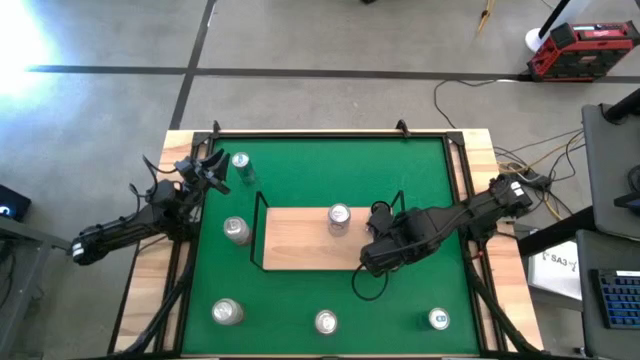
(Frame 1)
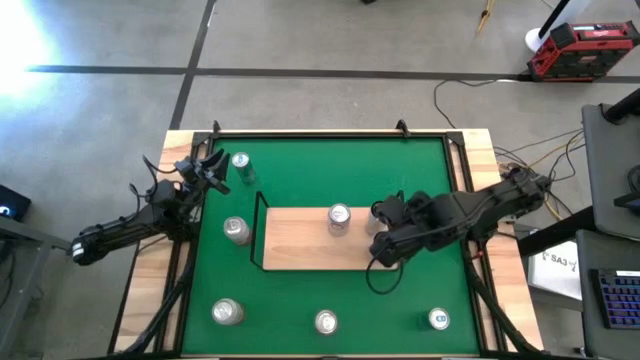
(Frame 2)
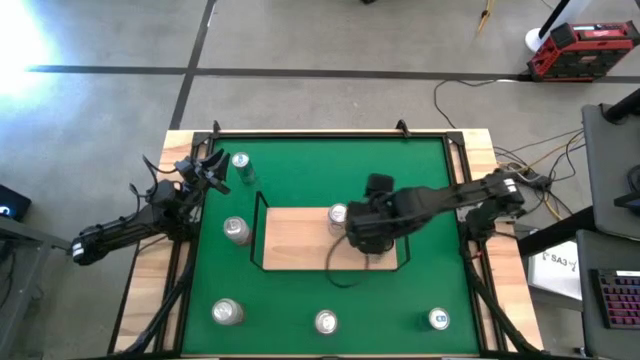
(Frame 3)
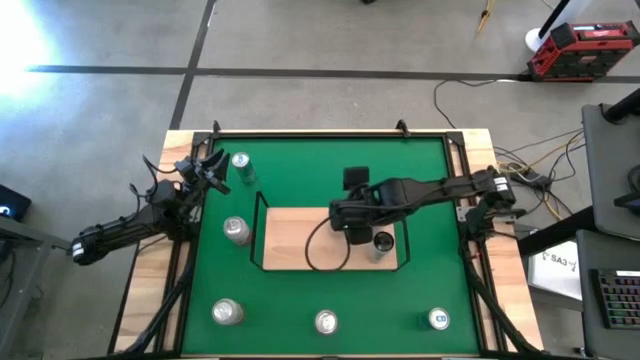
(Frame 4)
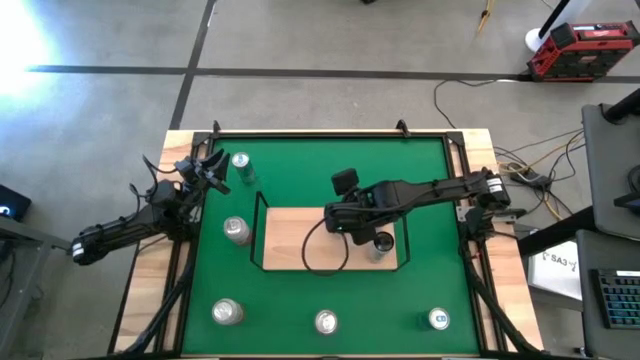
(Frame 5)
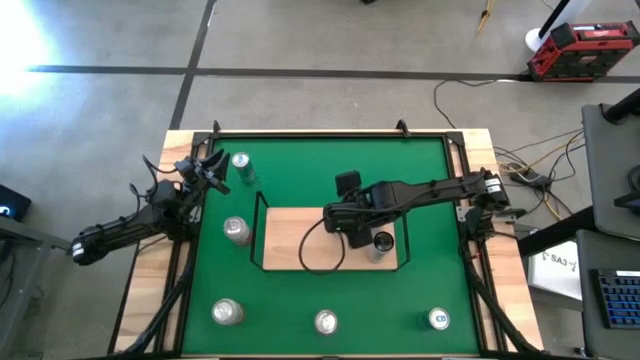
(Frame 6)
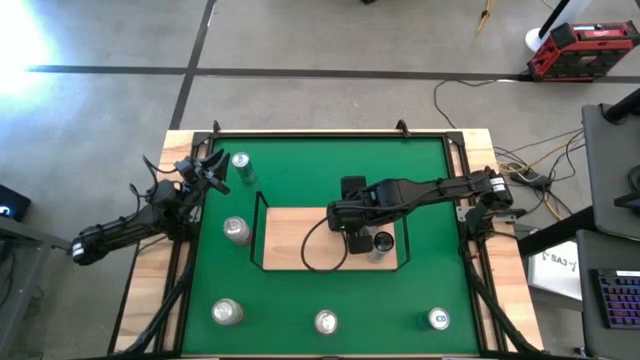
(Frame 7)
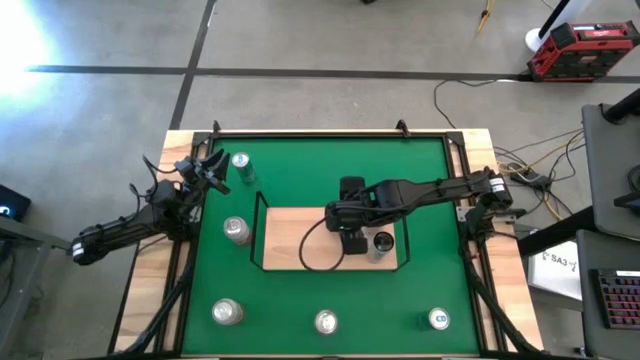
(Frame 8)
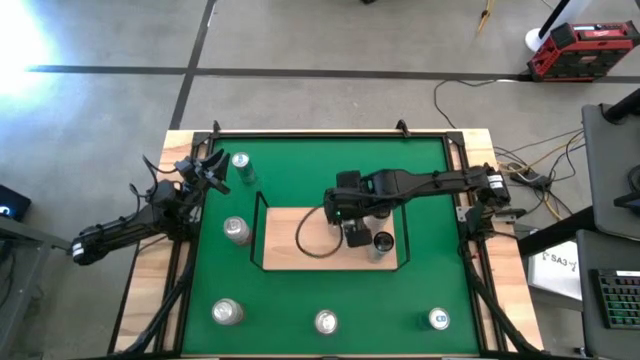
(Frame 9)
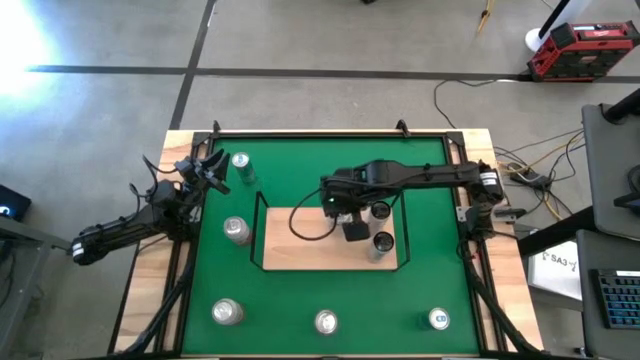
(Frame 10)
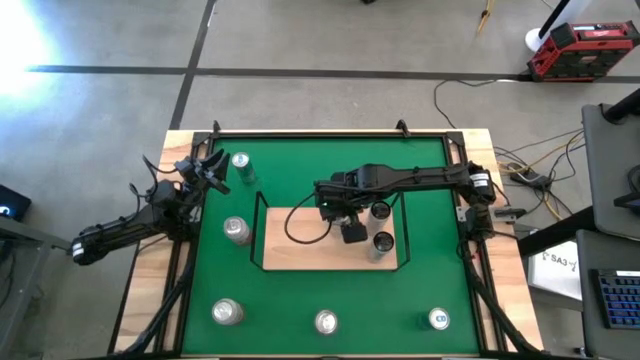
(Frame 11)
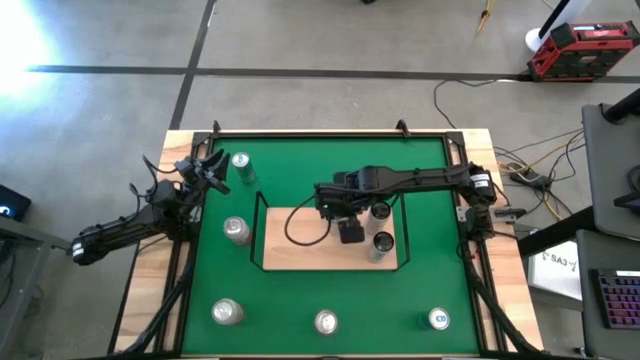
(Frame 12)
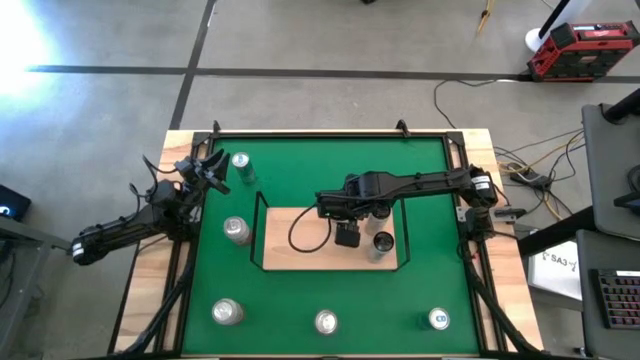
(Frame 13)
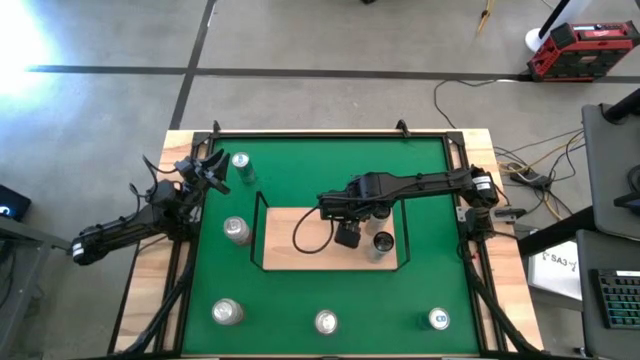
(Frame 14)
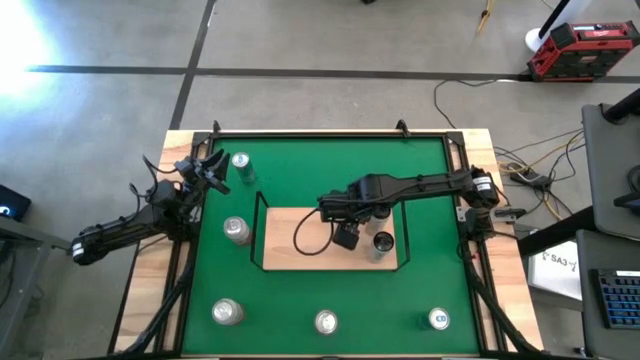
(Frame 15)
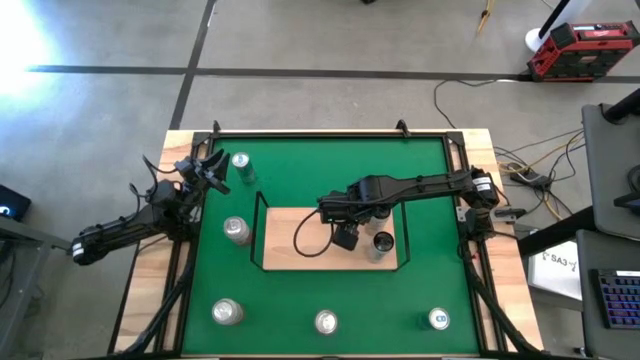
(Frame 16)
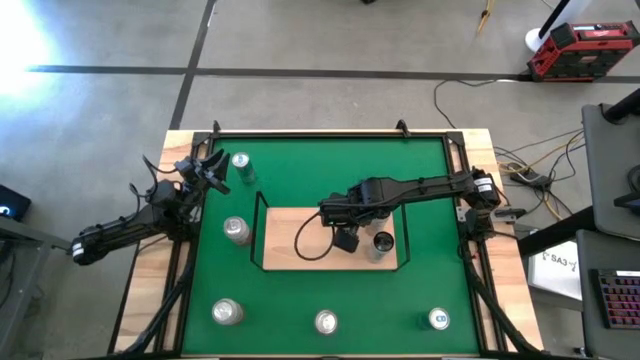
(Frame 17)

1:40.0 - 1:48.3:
Task: Place canned beverage on shelf
Adjust the red and silver soda can on the shelf

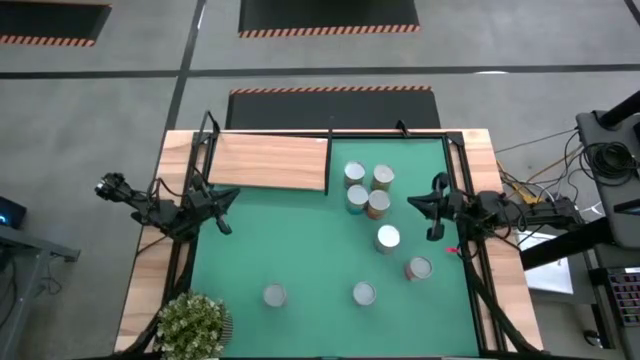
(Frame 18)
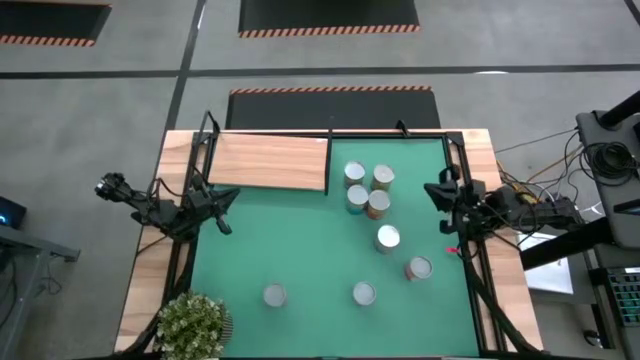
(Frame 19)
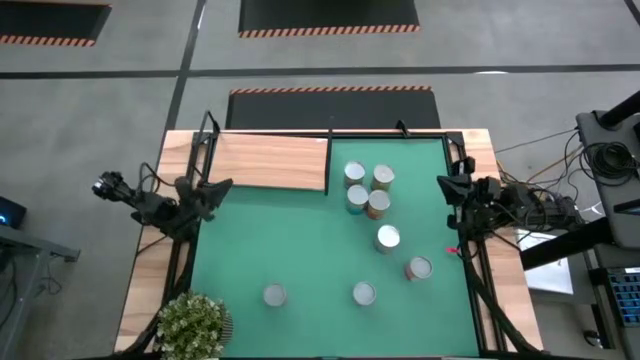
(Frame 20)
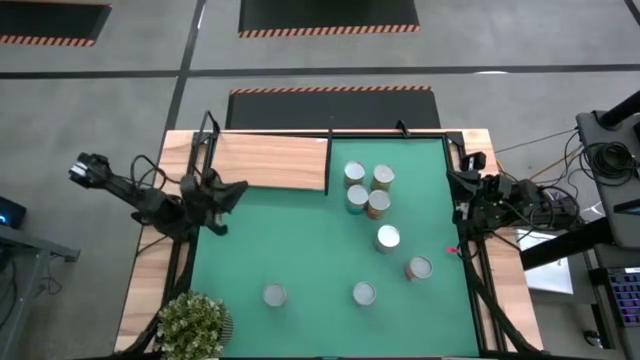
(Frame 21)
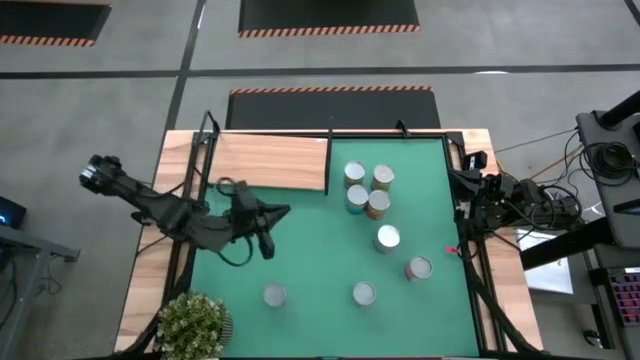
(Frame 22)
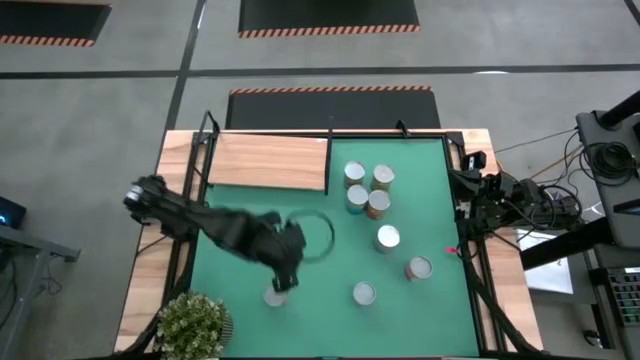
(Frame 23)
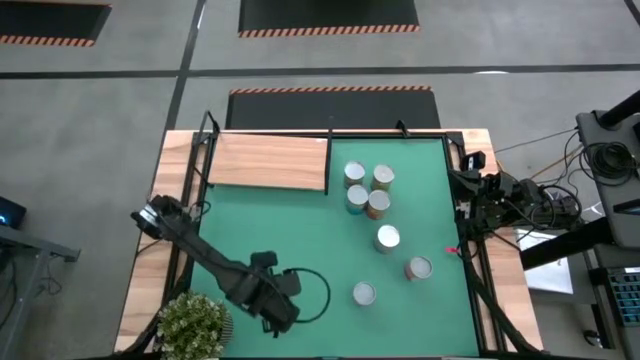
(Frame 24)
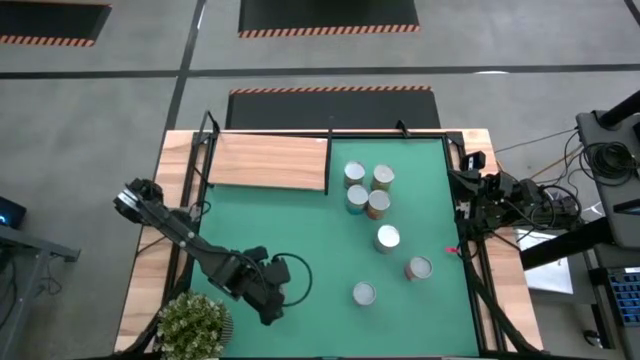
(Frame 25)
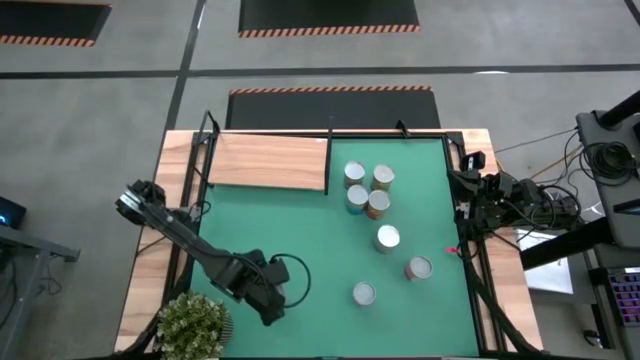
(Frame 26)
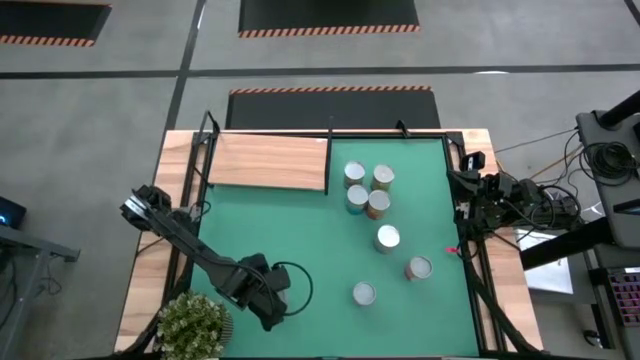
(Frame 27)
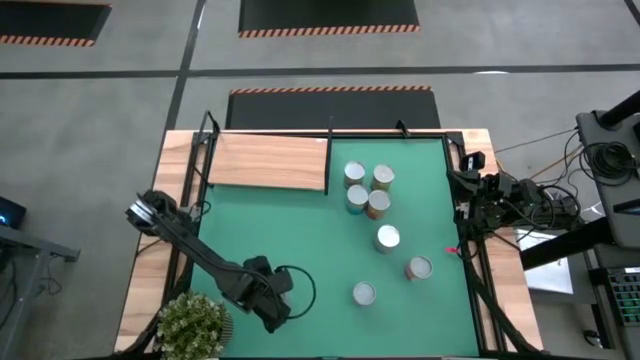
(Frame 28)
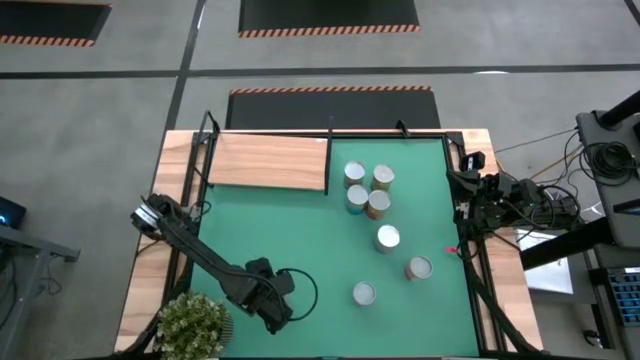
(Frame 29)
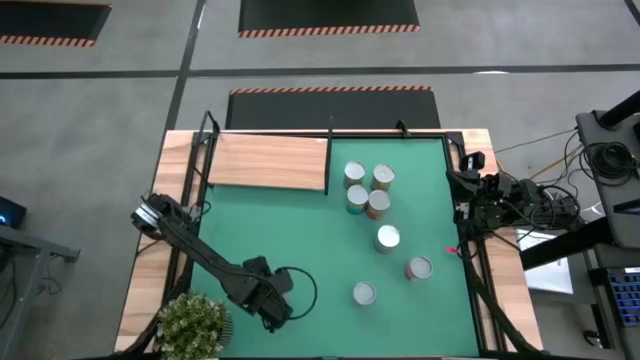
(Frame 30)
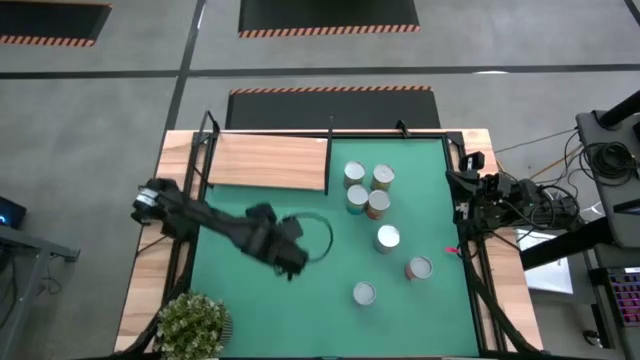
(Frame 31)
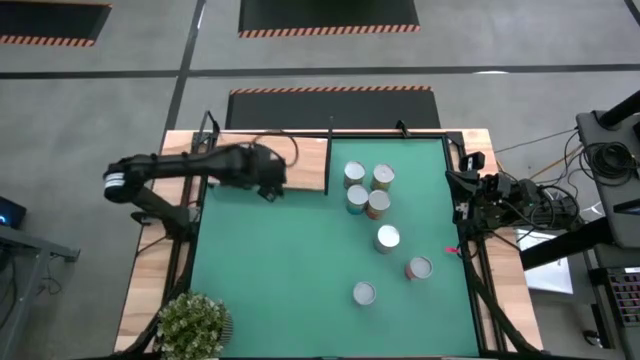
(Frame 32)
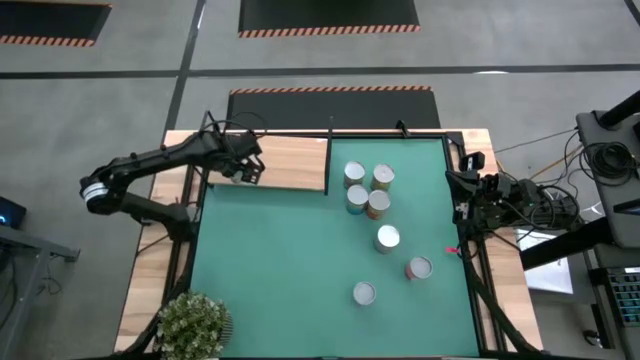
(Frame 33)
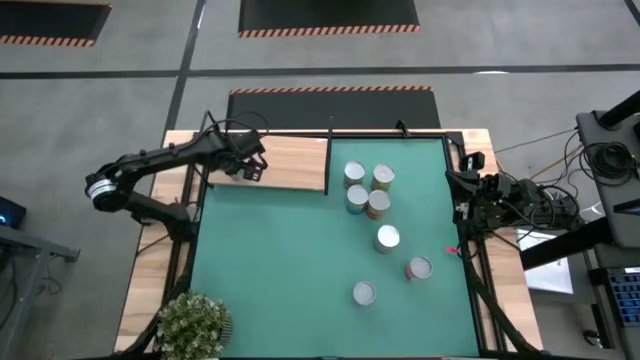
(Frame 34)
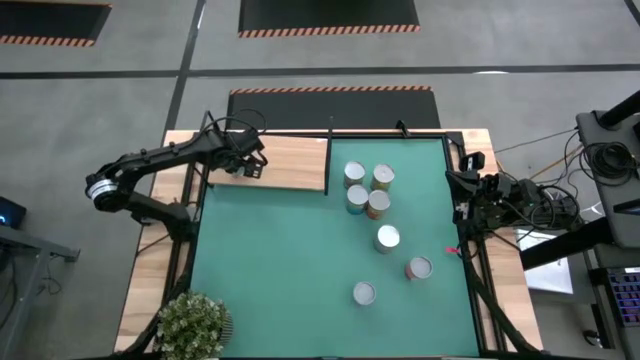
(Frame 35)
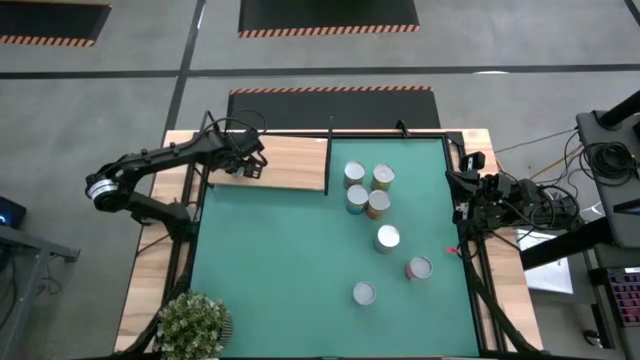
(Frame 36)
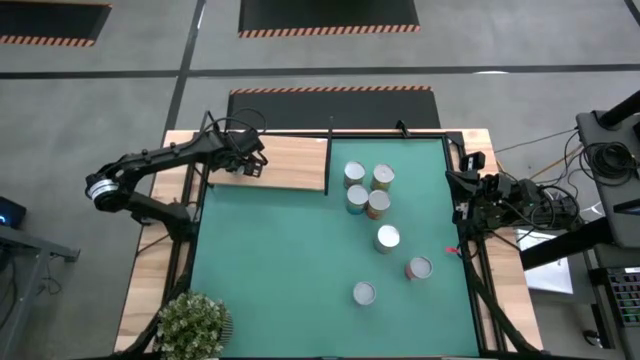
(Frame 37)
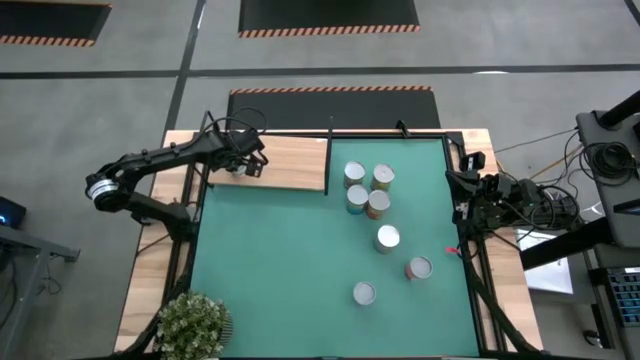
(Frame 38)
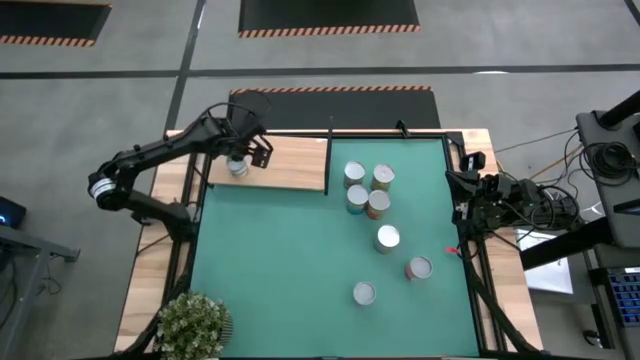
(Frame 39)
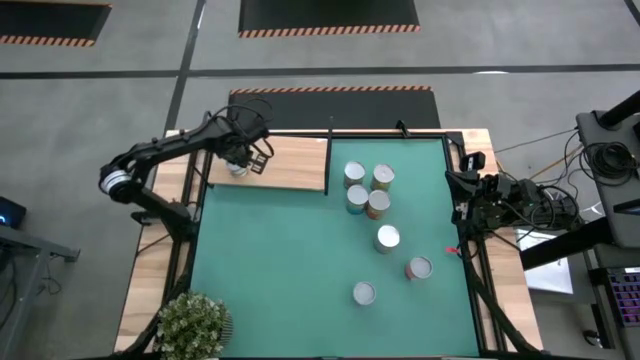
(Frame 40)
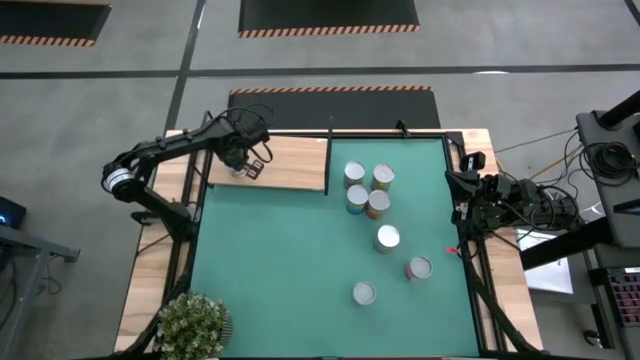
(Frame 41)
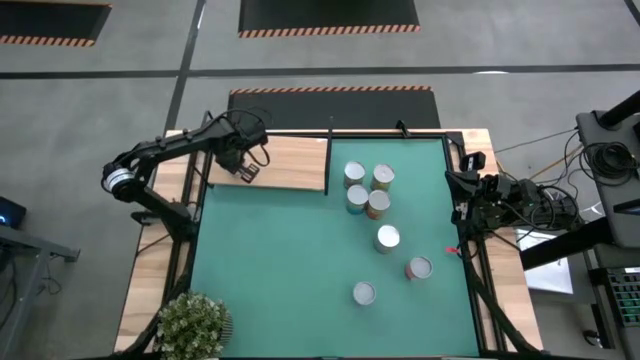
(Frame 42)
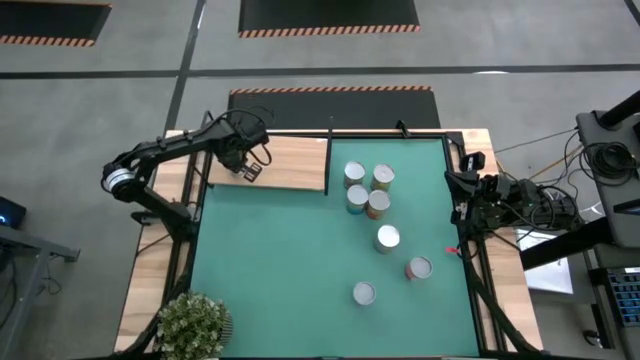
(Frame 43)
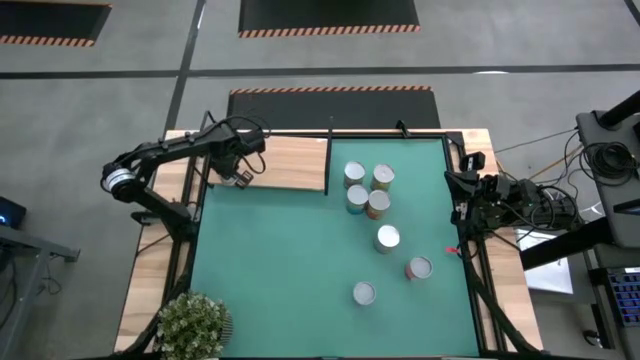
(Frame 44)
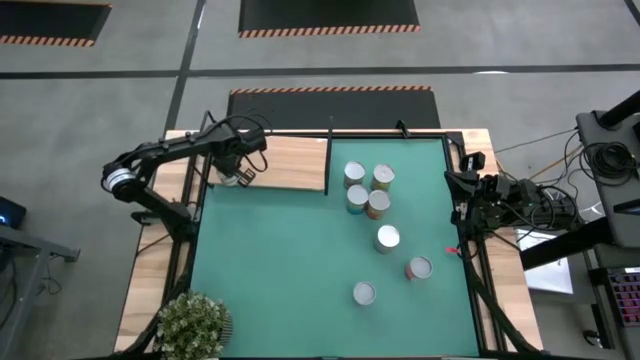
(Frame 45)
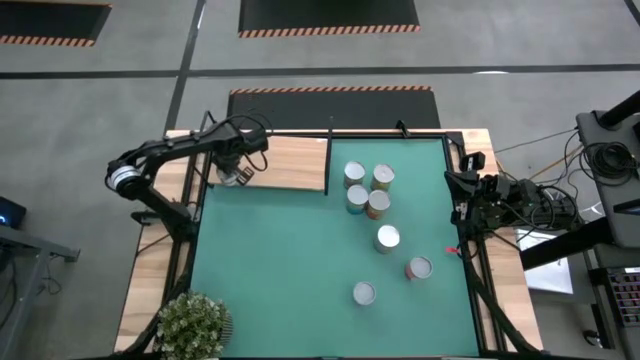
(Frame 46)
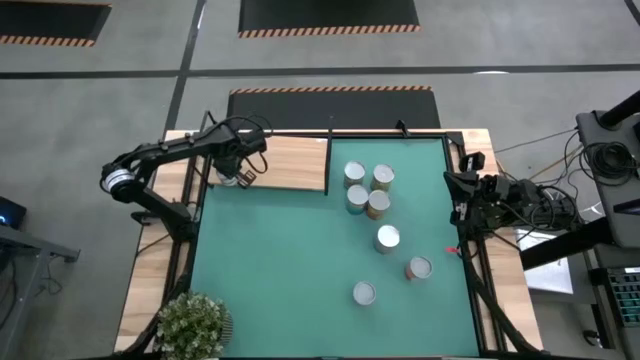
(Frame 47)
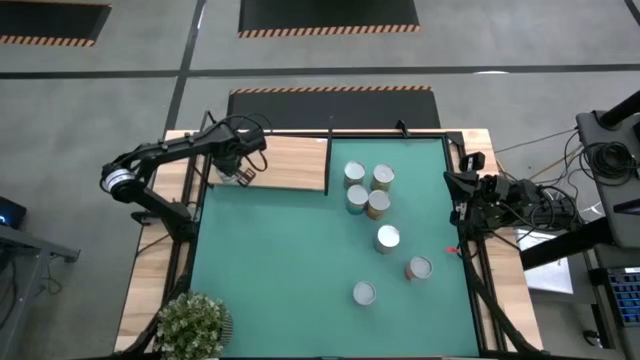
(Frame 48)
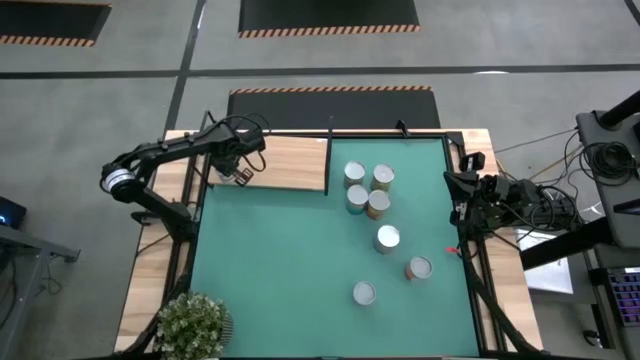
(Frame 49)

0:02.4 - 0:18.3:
Task: Pick and place cans onto a shelf
Put the small canned oranges on the shelf
